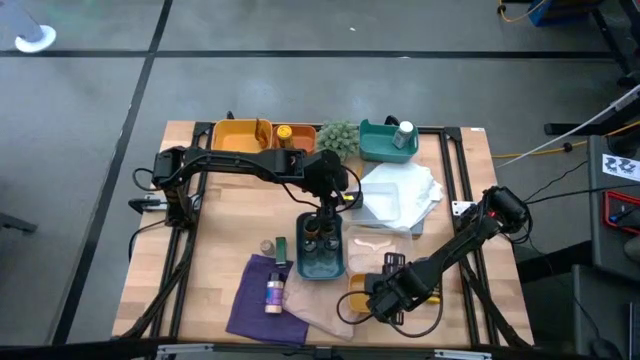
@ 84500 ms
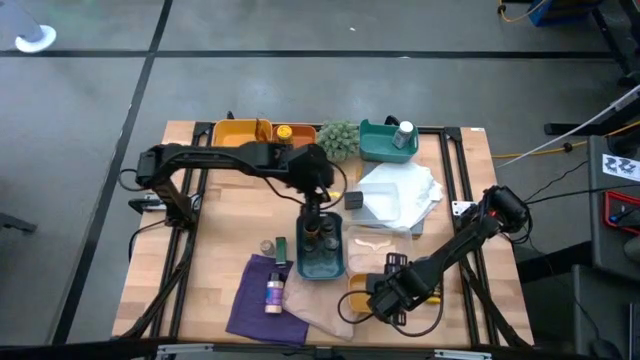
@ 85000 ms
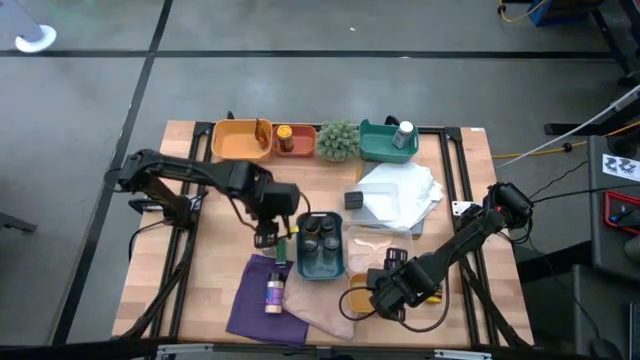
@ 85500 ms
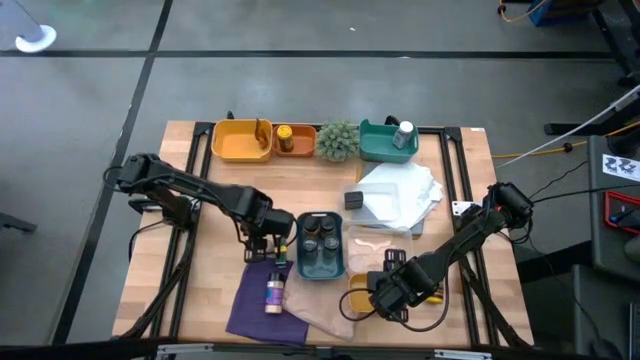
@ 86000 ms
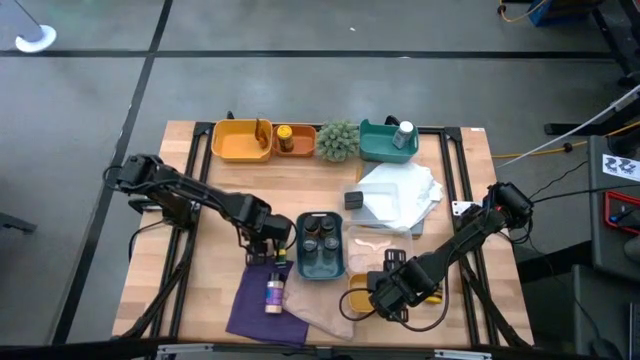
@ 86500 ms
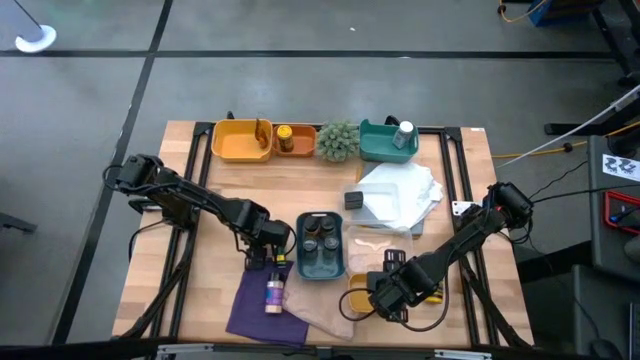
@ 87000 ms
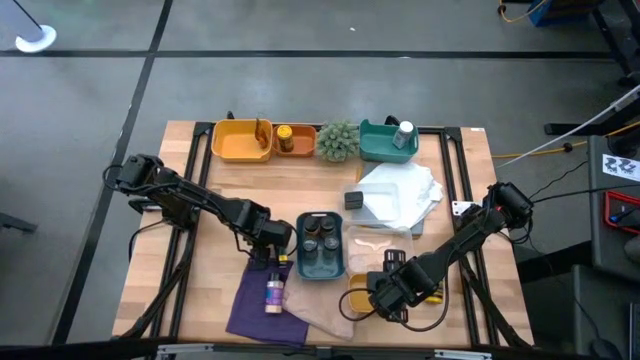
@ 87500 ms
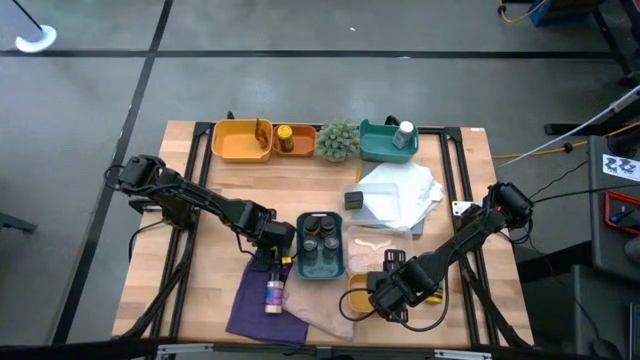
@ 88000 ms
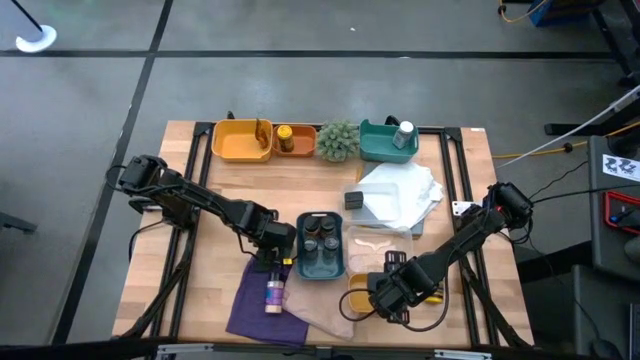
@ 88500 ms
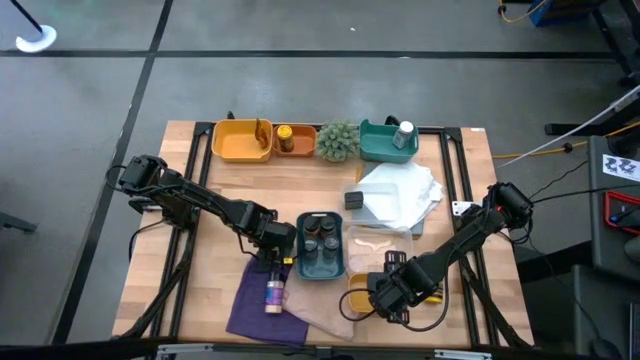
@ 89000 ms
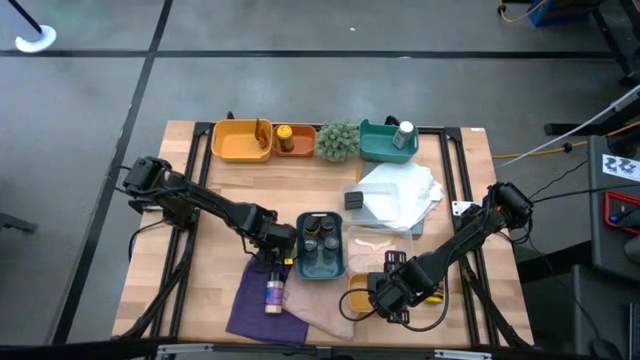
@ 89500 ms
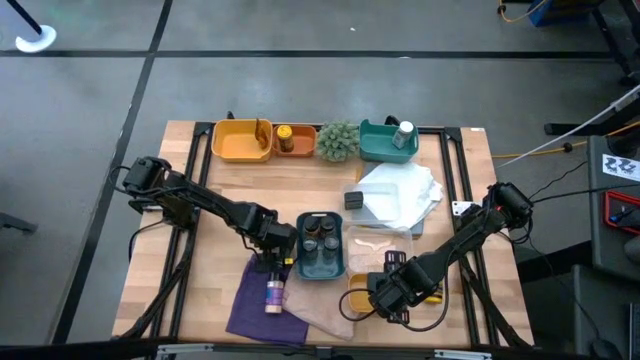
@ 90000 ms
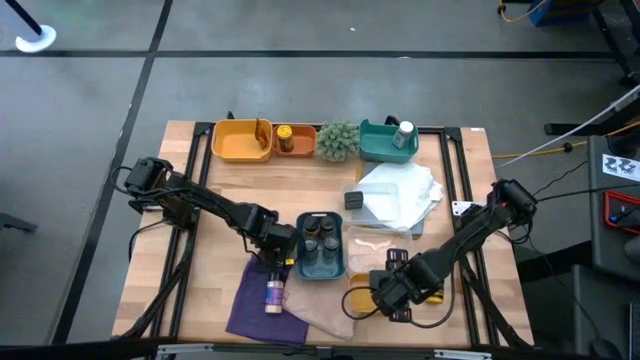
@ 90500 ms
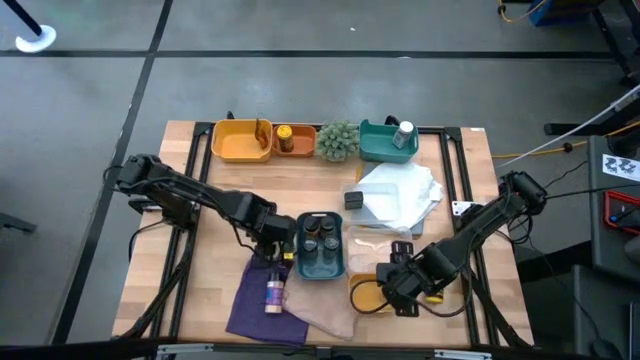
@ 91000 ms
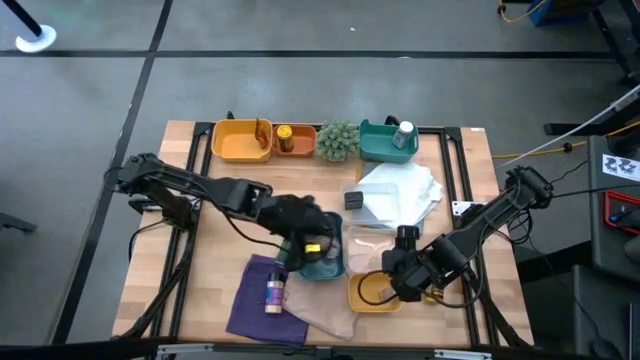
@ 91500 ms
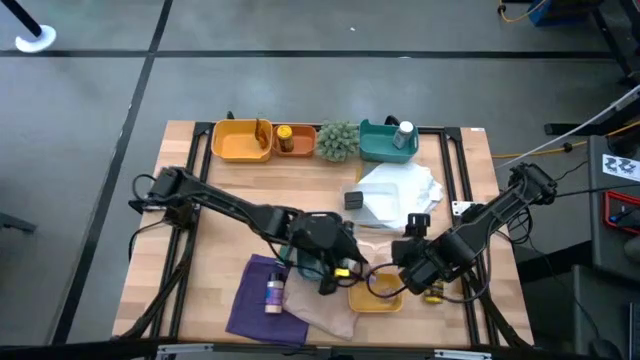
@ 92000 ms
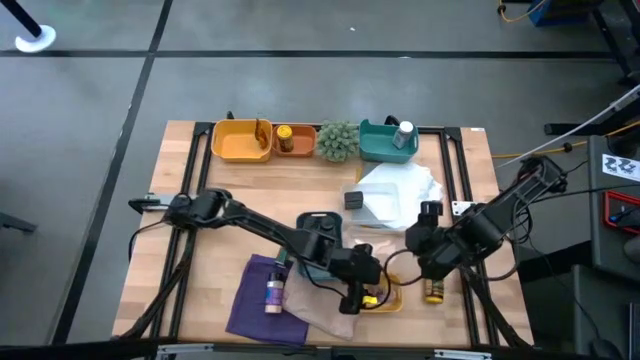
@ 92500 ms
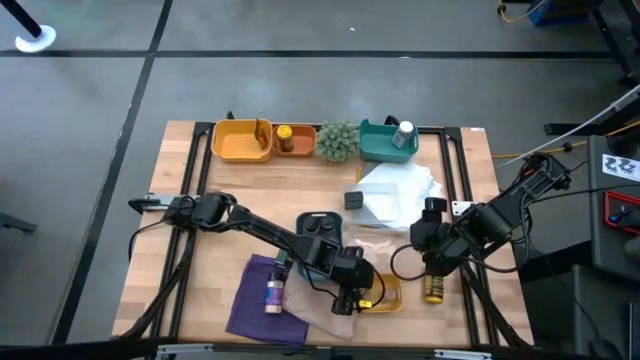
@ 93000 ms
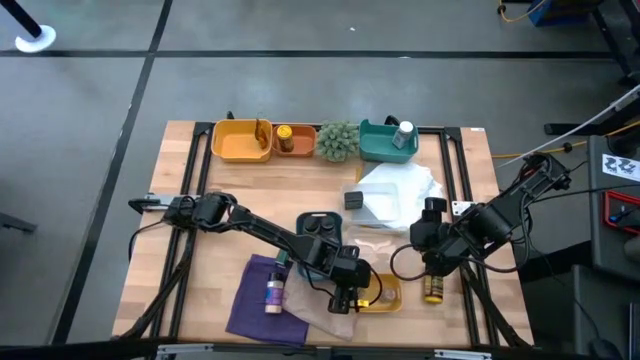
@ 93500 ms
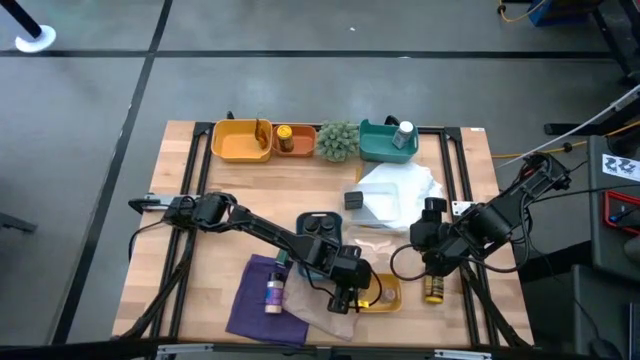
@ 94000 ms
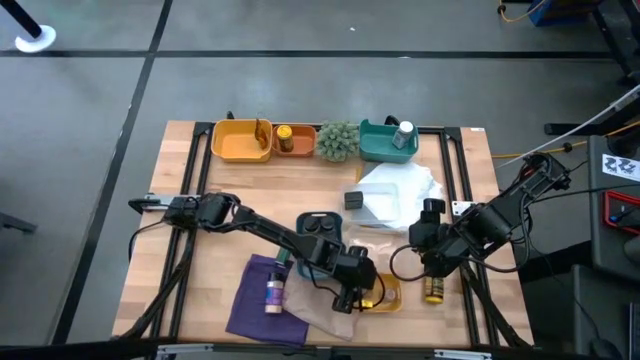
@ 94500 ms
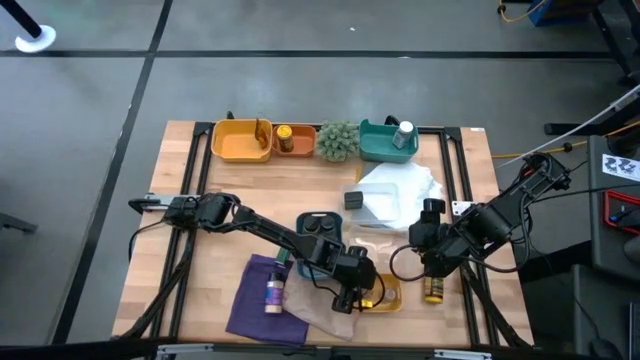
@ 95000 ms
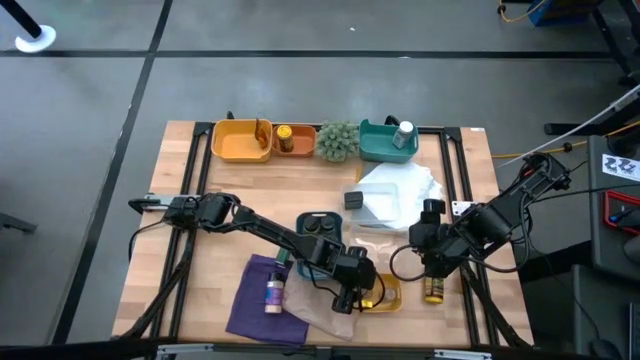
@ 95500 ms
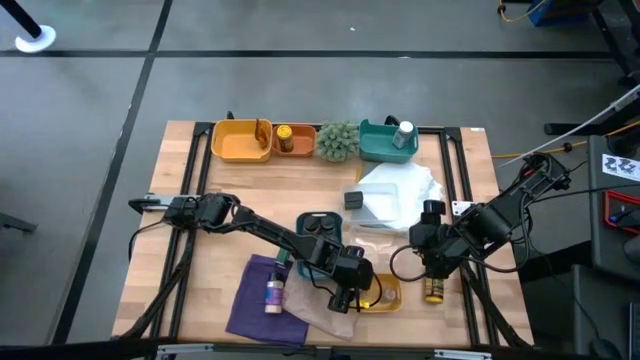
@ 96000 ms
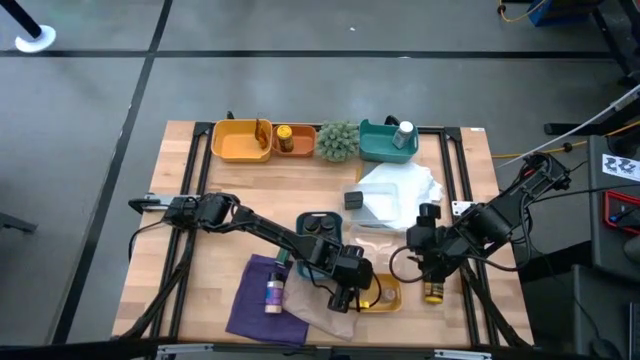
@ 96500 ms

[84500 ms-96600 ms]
Task: Sort spices by type
Put the brown seasoning bottle into the bottom yellow bin

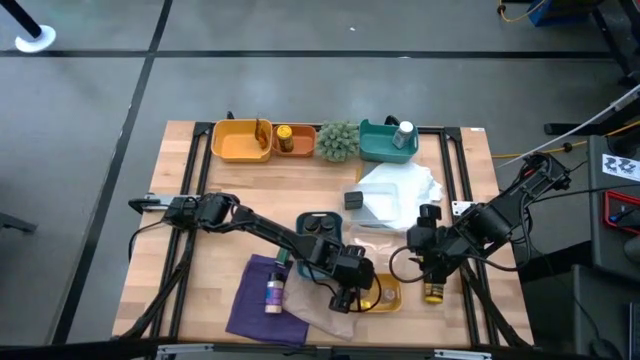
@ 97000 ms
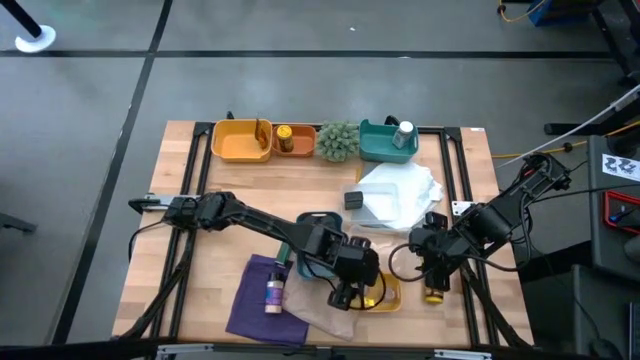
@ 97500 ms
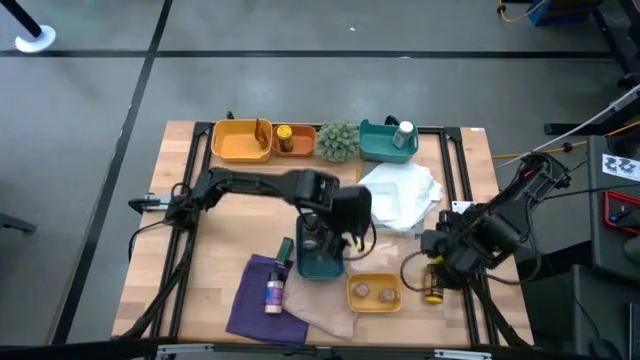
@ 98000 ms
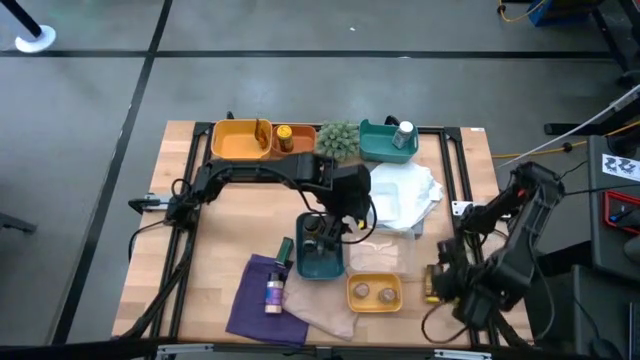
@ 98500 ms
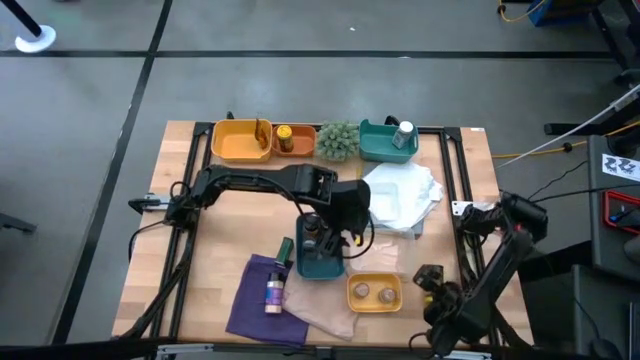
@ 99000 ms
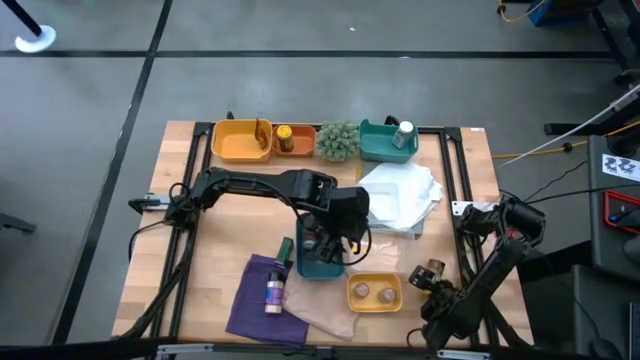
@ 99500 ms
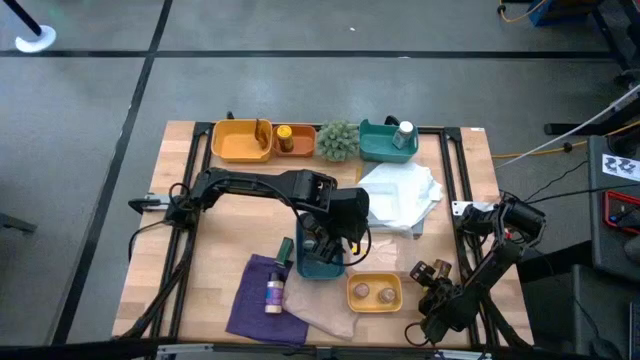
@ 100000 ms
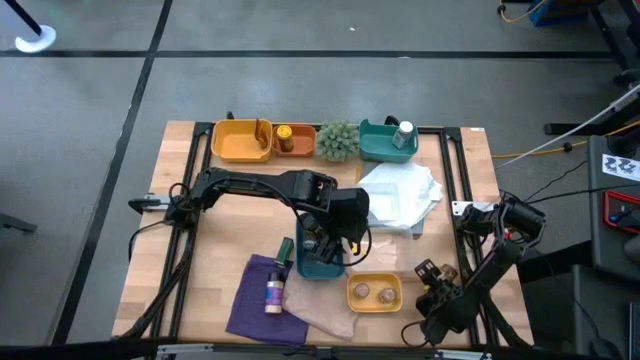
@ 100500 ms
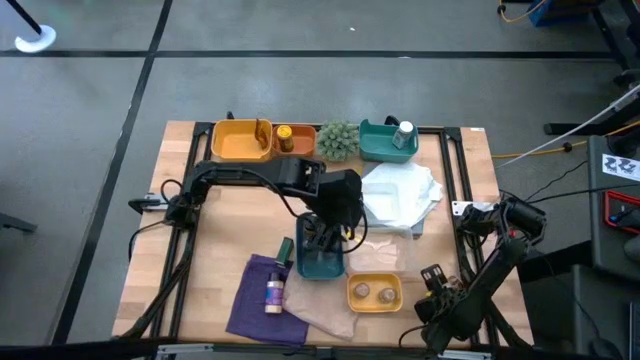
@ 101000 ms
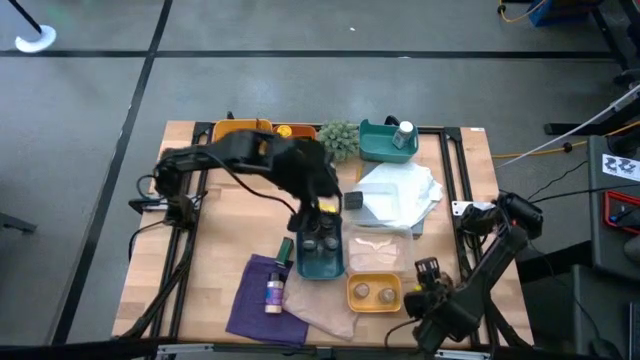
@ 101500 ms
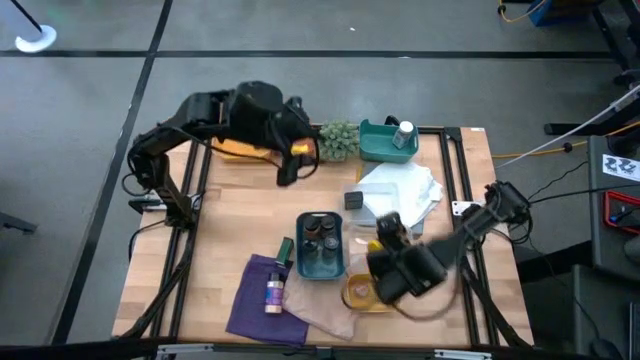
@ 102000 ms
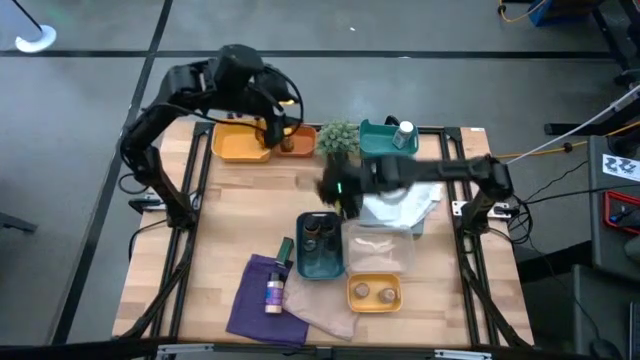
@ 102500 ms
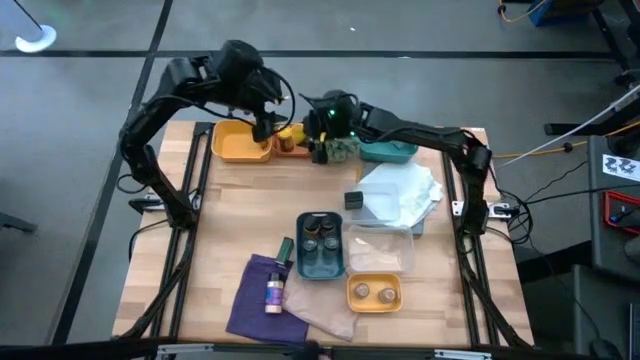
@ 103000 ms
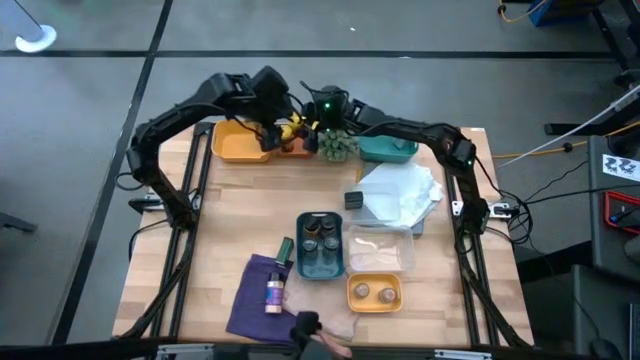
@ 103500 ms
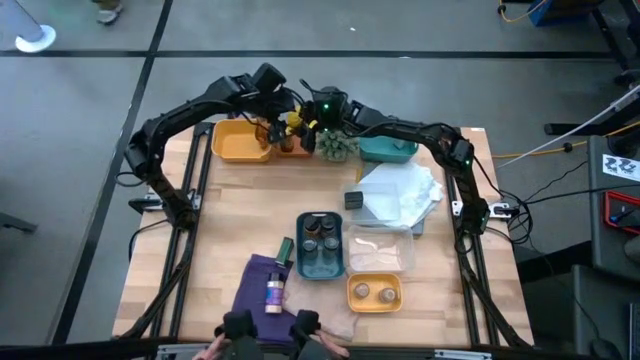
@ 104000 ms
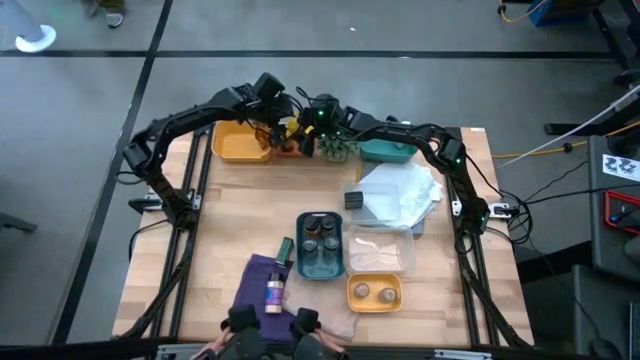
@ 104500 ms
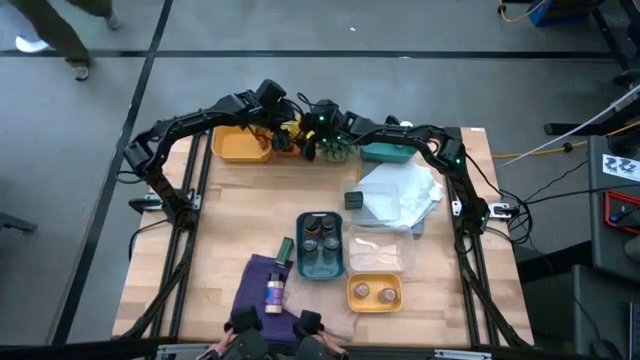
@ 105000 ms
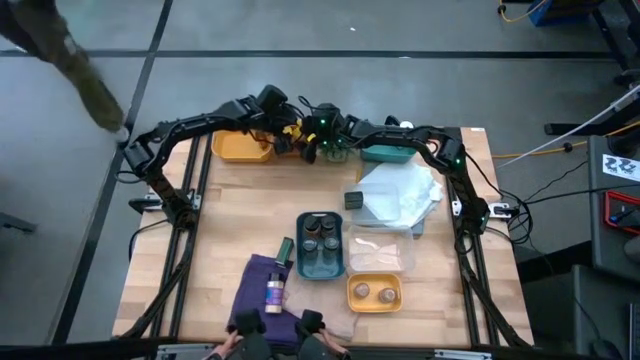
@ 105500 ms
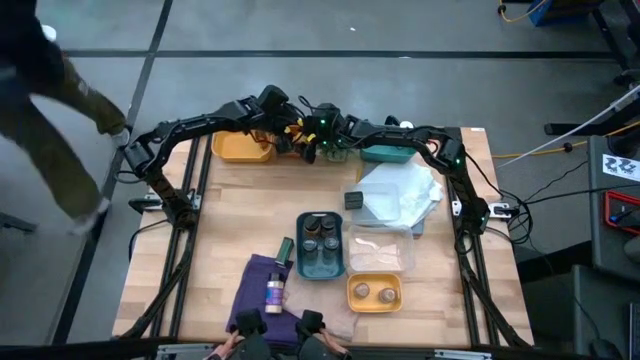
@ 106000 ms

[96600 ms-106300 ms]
Put the yellow seasoning bottle into the orange bin
